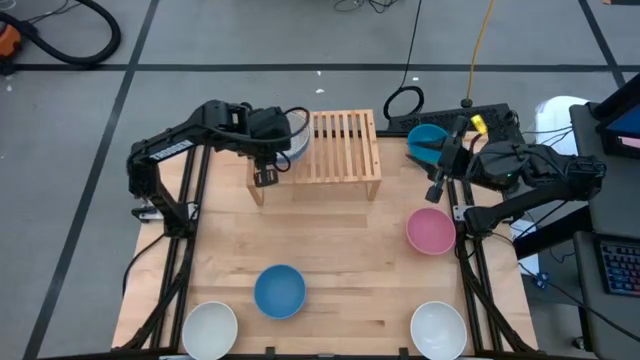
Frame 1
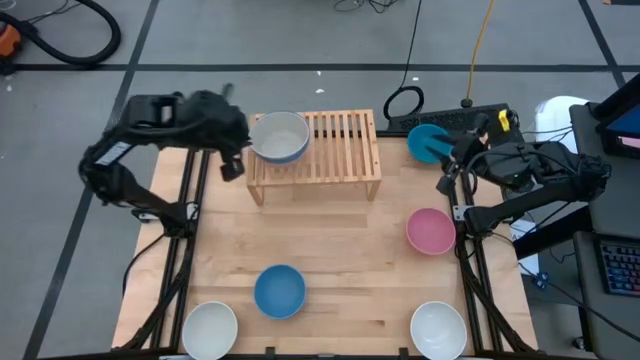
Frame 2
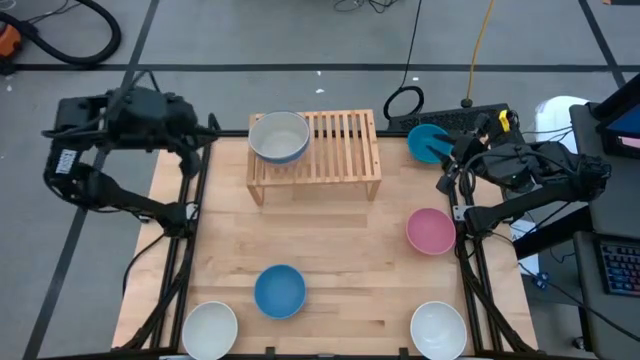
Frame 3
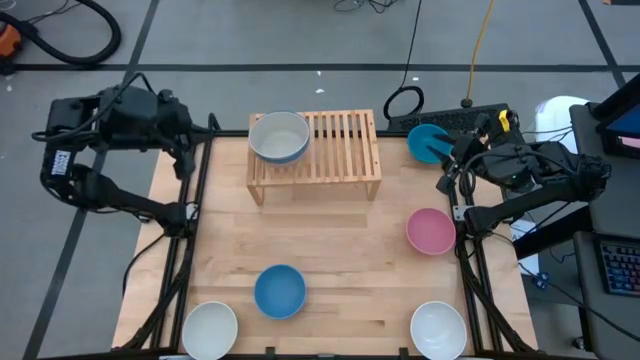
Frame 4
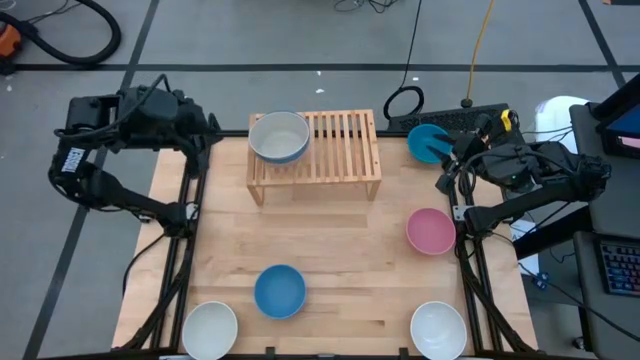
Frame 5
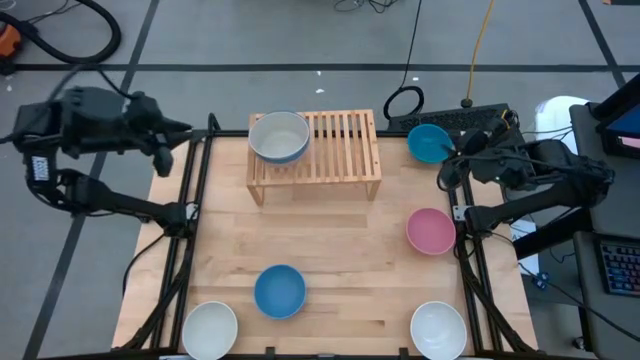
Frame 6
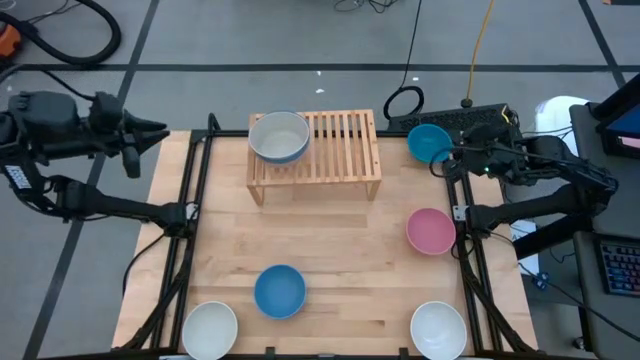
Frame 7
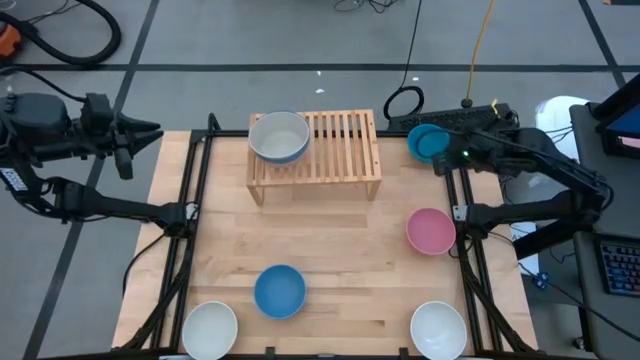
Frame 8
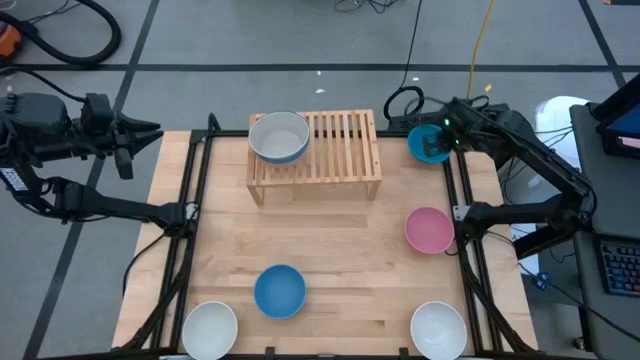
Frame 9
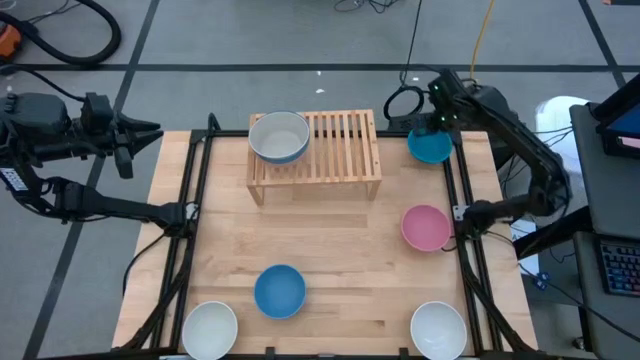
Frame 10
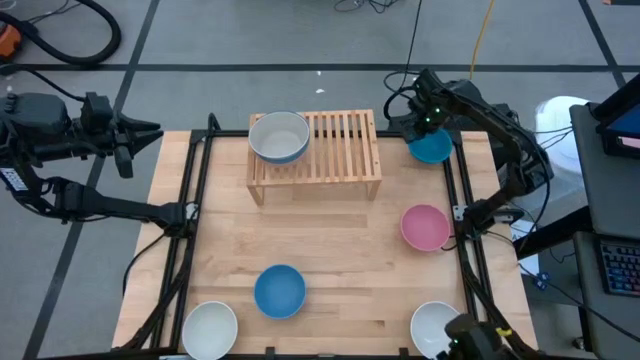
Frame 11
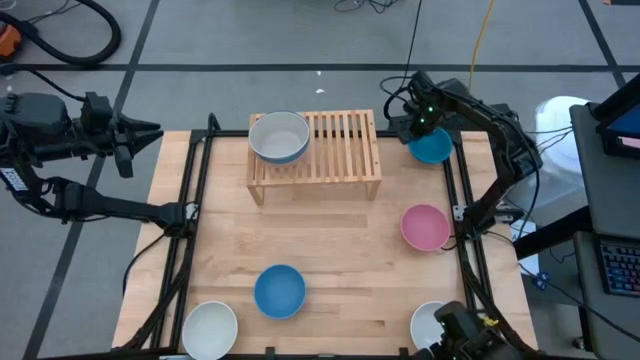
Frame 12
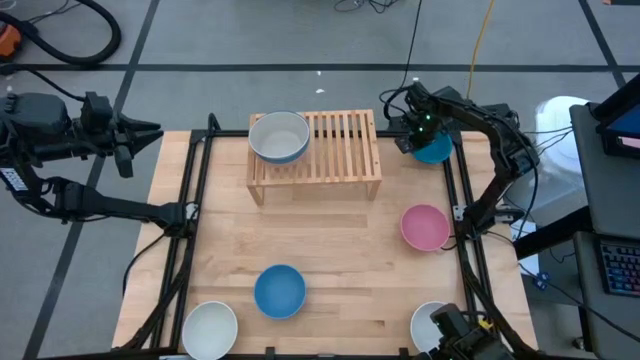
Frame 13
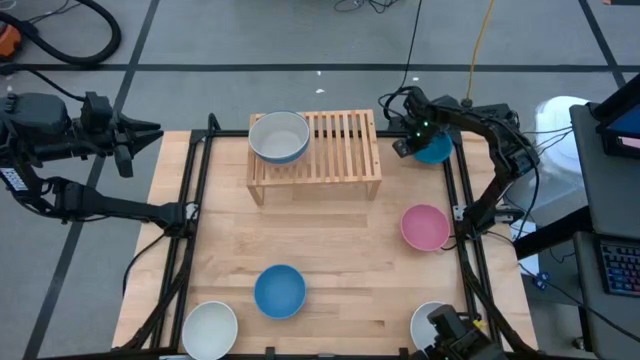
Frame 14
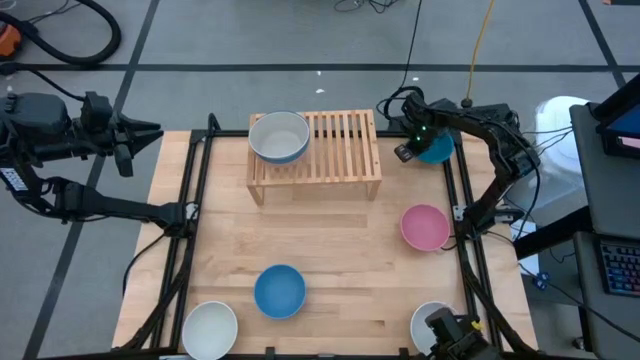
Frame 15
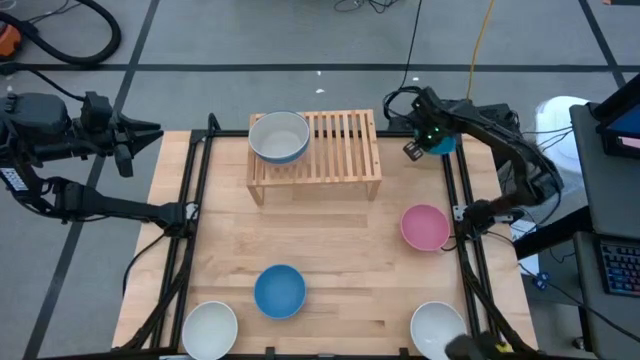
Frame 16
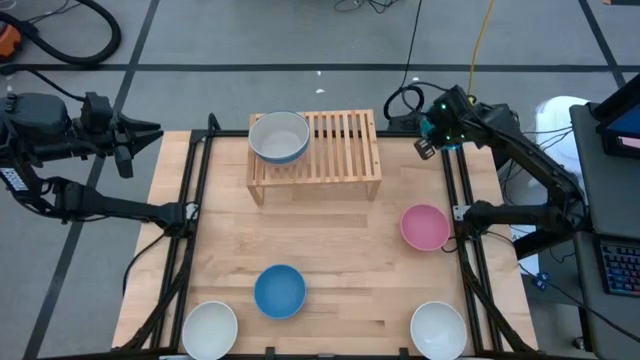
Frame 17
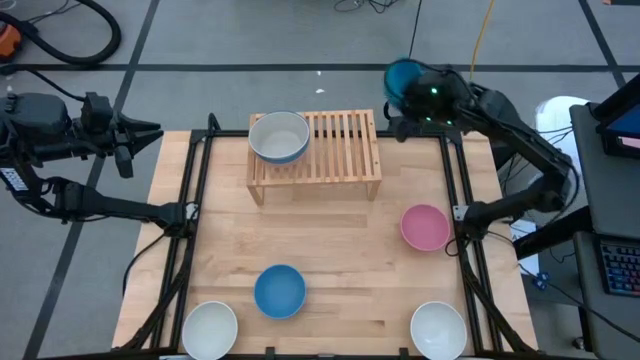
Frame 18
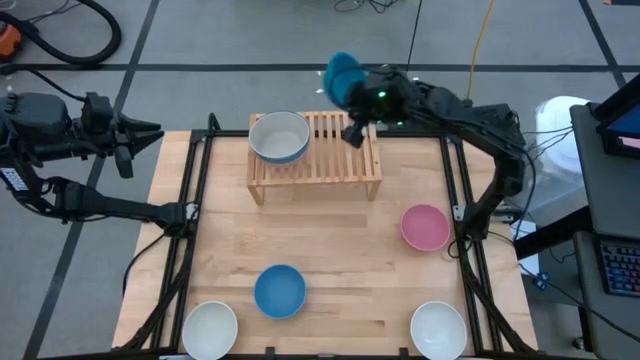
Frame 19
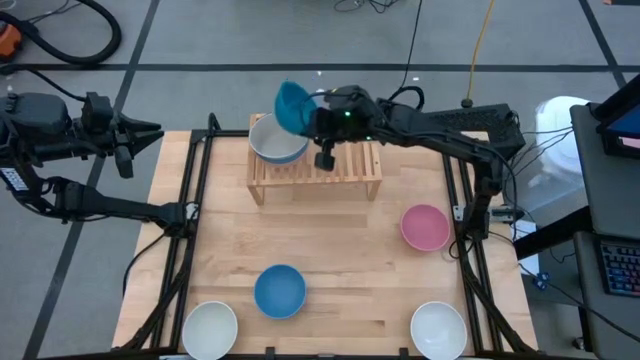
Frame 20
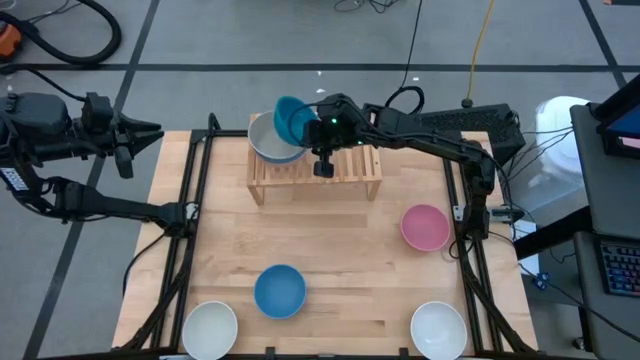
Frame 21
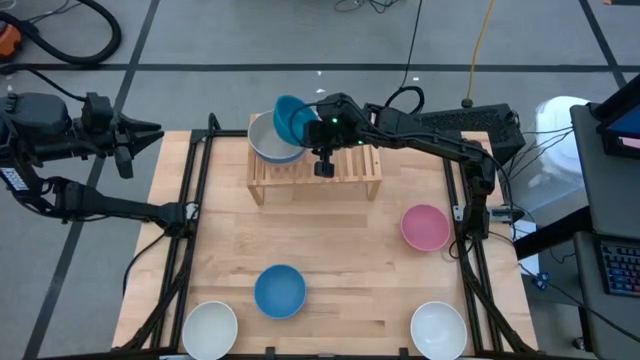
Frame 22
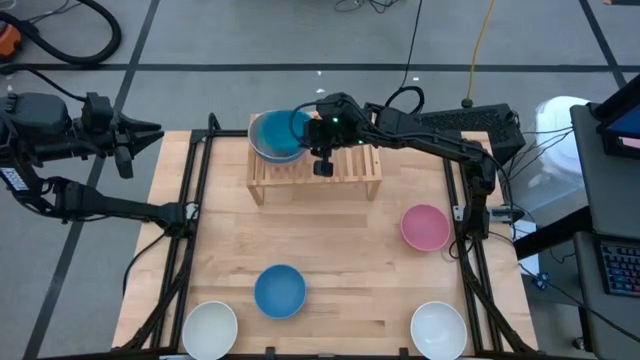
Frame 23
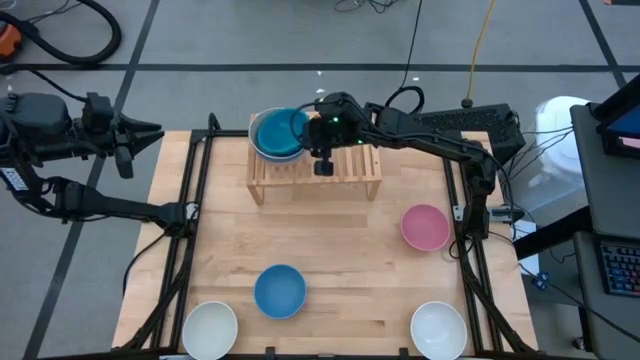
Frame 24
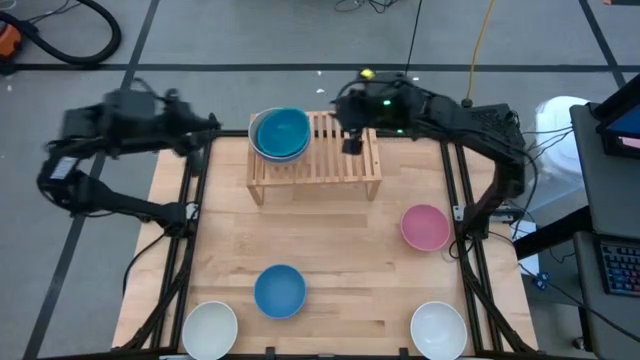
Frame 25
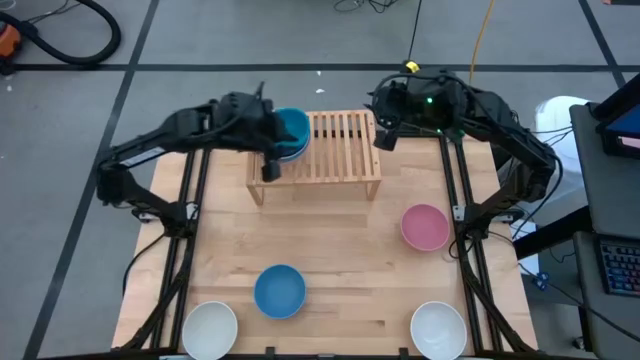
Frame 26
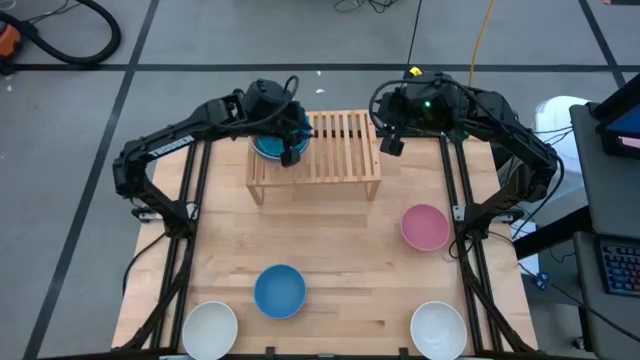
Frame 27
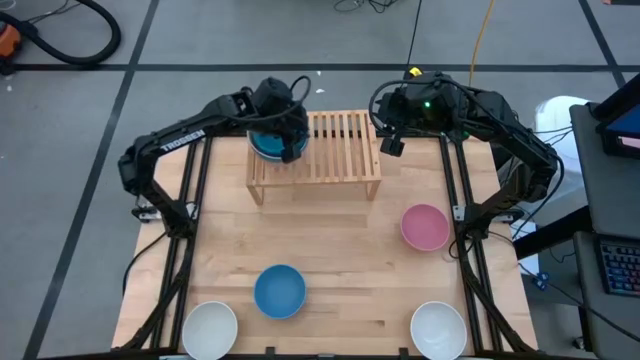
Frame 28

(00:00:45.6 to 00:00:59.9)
Task: Place and stack bowls onto a shelf
Stack the top blue bowl on top of the gray bowl on the shelf

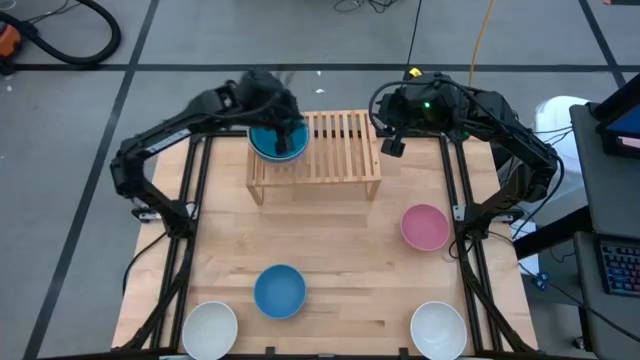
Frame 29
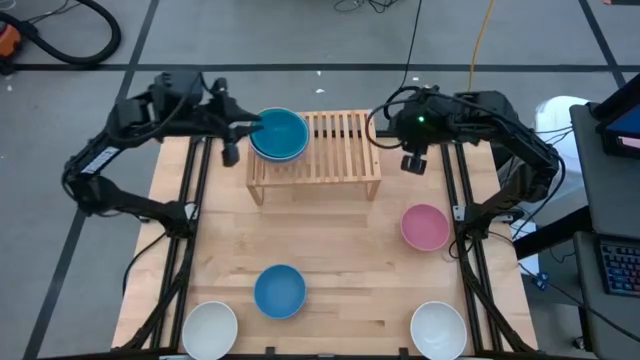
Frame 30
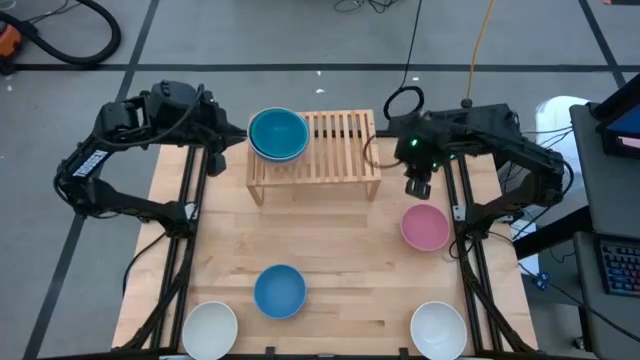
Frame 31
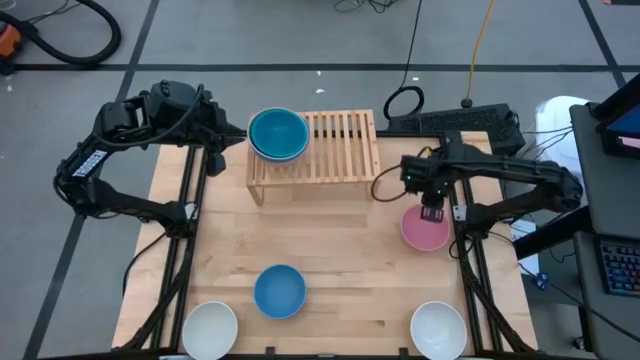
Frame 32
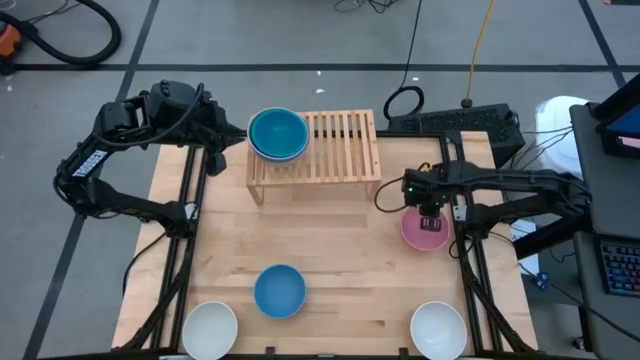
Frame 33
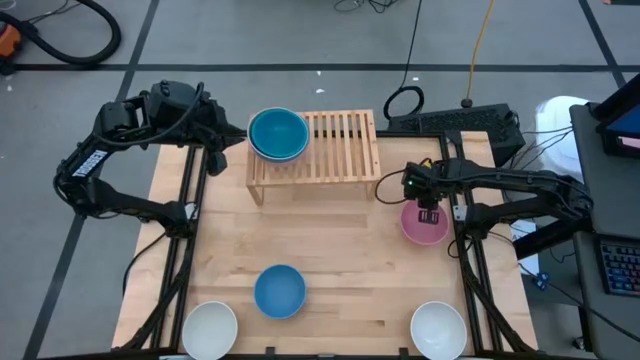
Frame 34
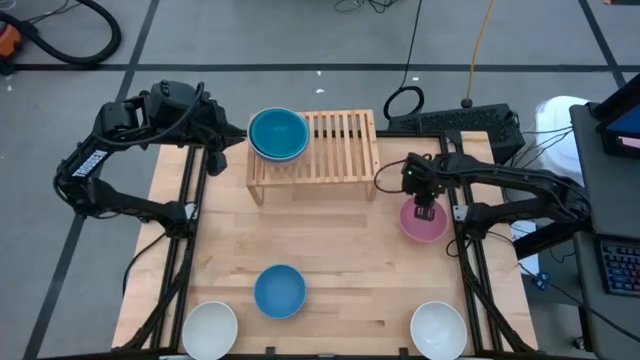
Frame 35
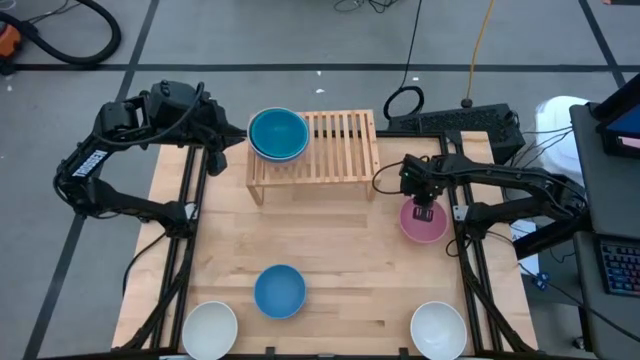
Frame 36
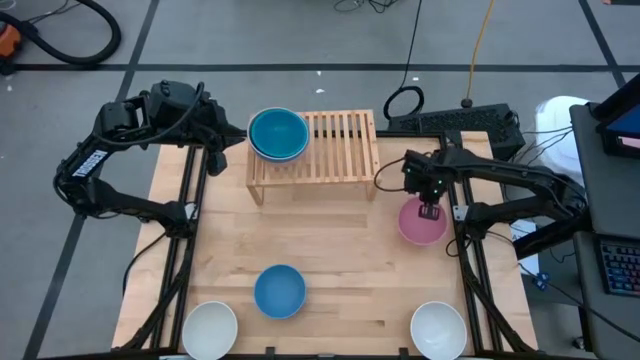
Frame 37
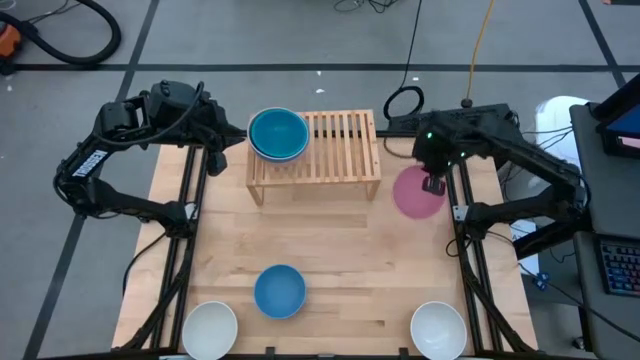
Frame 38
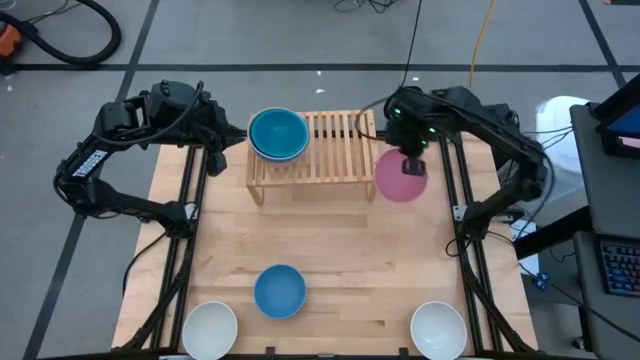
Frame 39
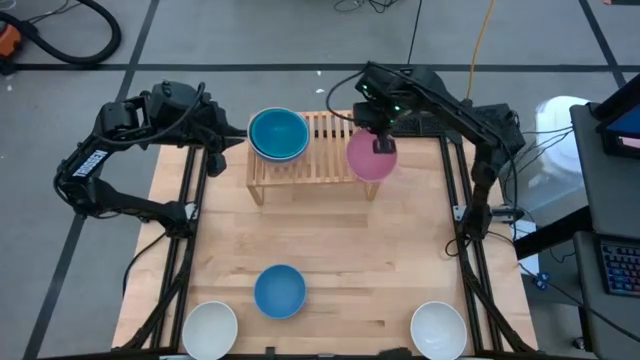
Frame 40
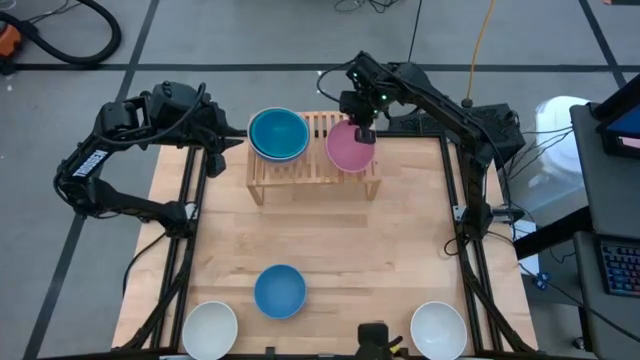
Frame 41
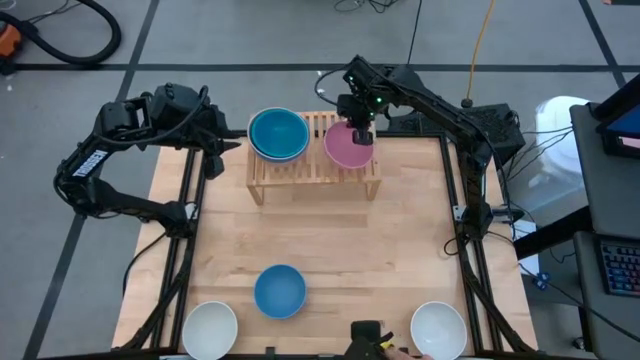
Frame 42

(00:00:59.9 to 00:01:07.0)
Put the pink bowl on the shelf
